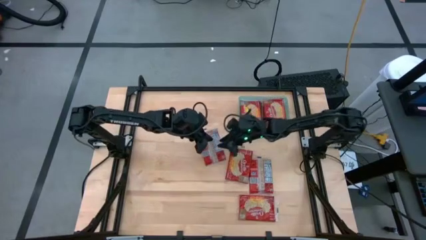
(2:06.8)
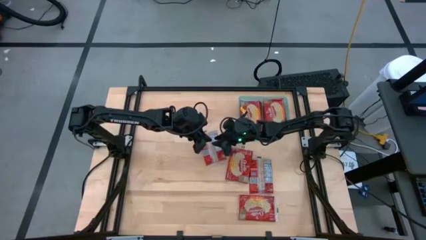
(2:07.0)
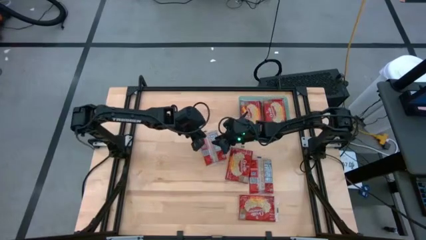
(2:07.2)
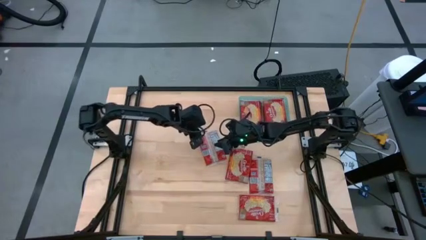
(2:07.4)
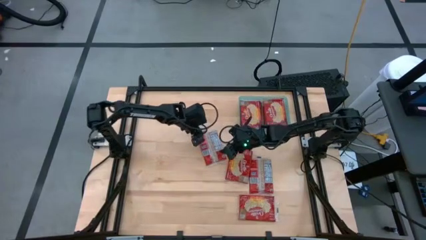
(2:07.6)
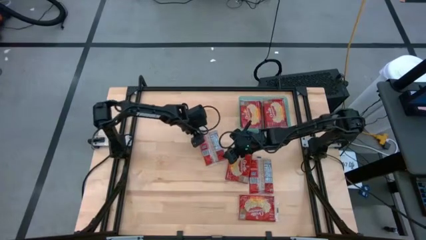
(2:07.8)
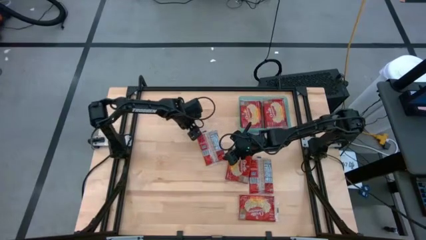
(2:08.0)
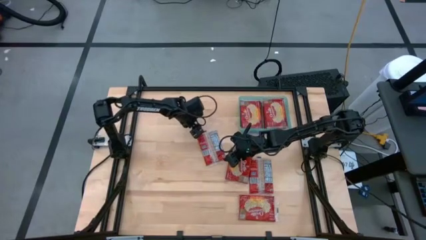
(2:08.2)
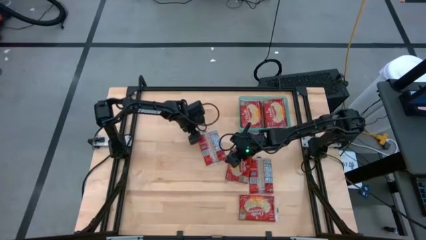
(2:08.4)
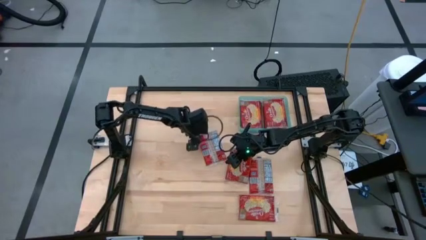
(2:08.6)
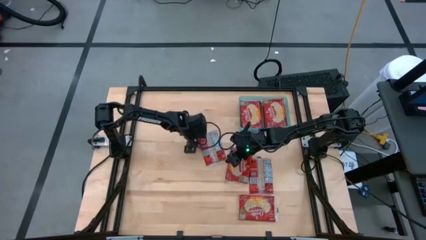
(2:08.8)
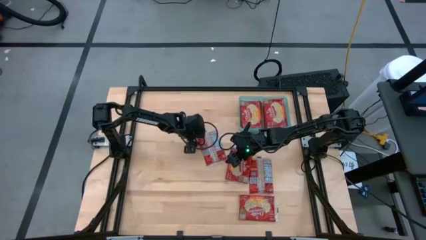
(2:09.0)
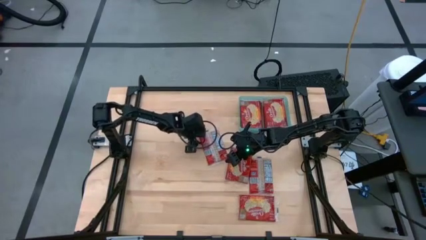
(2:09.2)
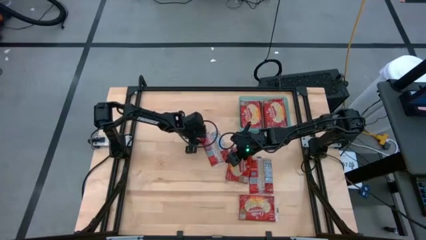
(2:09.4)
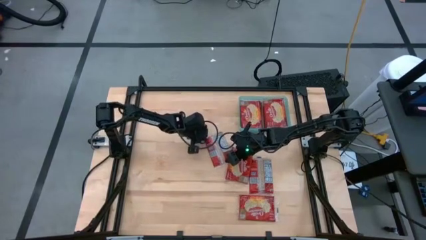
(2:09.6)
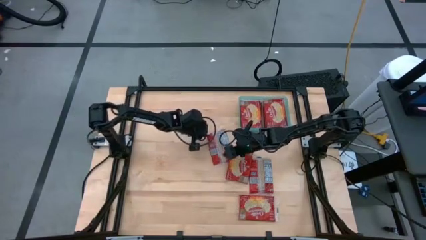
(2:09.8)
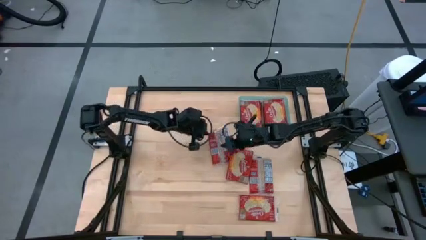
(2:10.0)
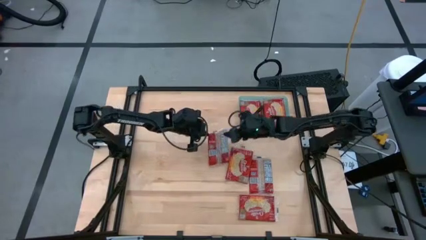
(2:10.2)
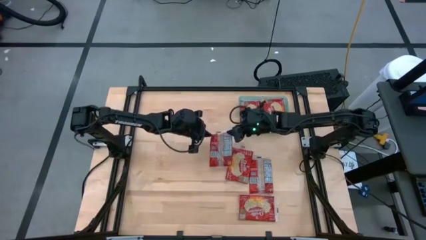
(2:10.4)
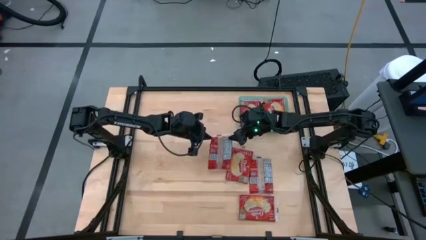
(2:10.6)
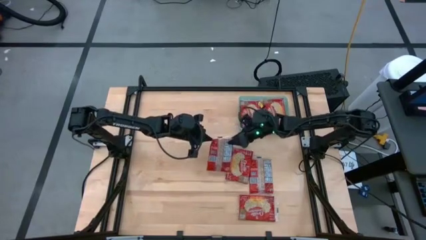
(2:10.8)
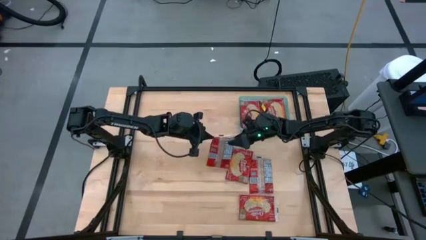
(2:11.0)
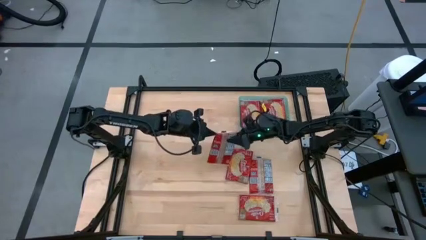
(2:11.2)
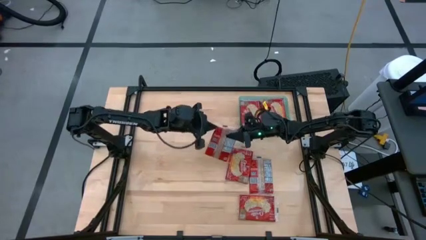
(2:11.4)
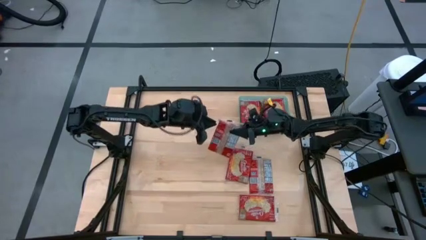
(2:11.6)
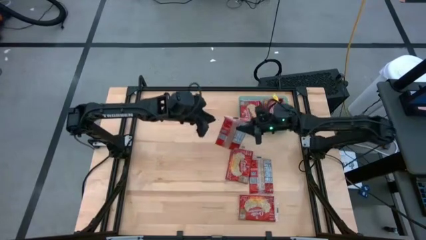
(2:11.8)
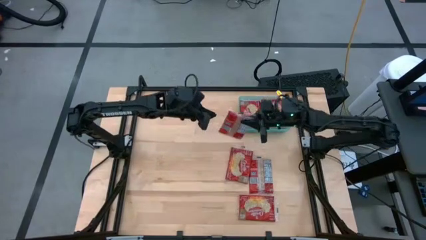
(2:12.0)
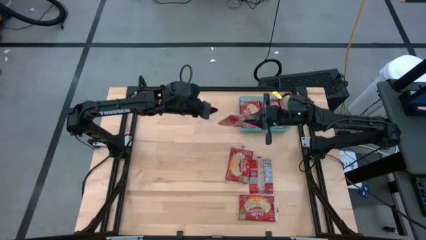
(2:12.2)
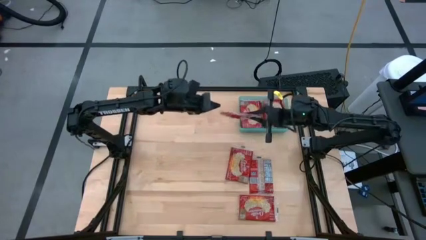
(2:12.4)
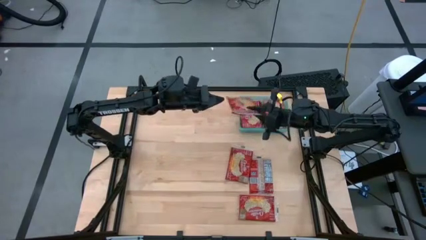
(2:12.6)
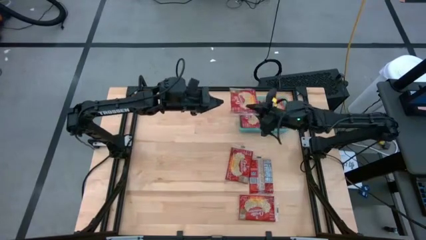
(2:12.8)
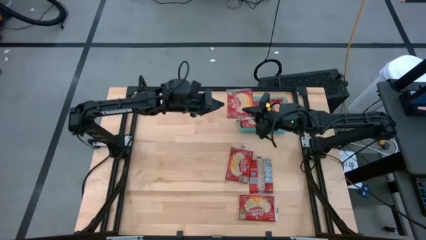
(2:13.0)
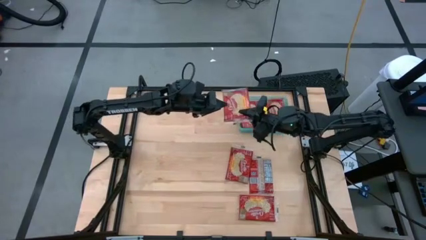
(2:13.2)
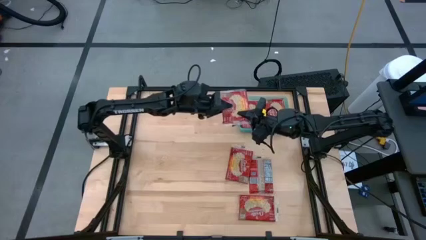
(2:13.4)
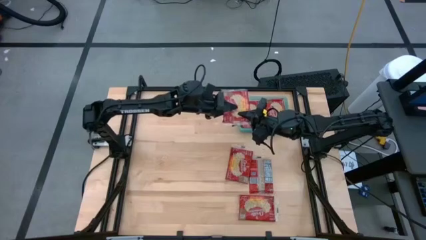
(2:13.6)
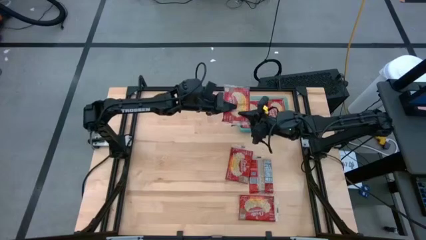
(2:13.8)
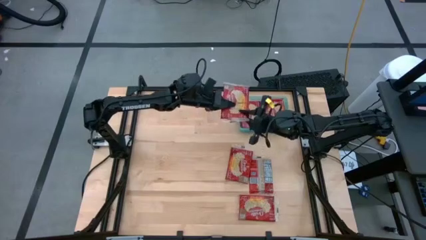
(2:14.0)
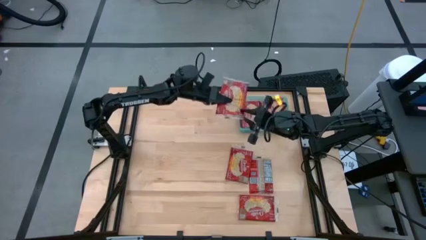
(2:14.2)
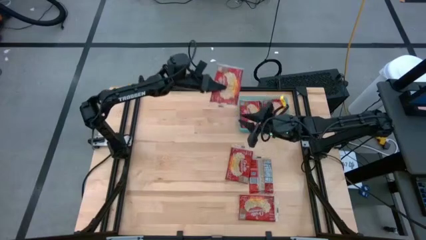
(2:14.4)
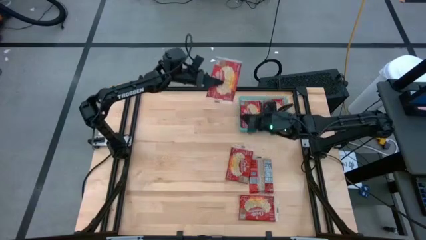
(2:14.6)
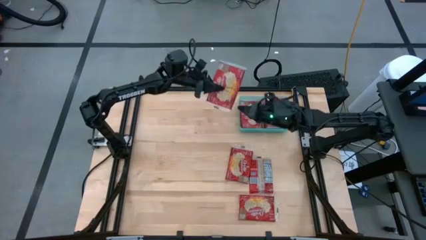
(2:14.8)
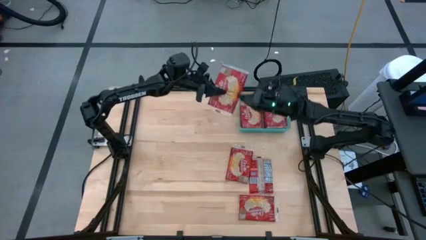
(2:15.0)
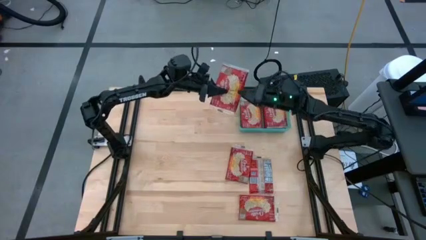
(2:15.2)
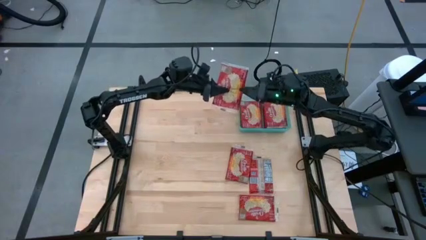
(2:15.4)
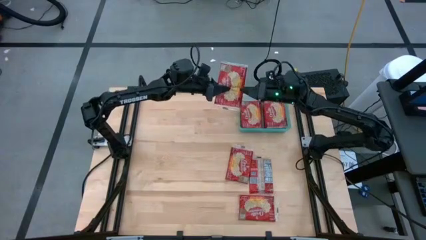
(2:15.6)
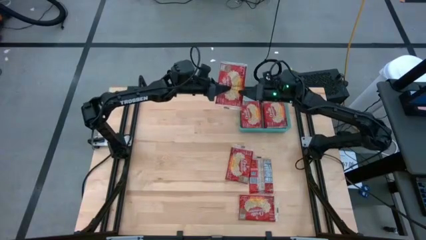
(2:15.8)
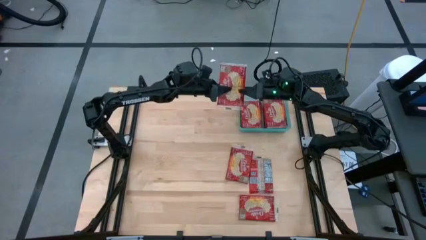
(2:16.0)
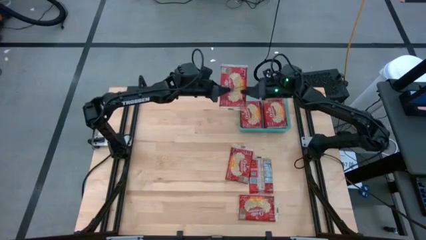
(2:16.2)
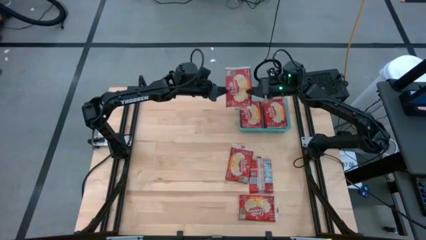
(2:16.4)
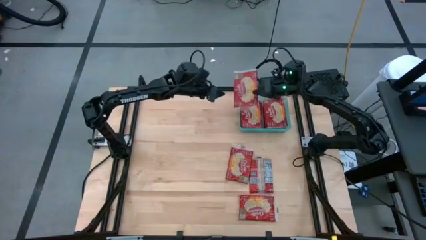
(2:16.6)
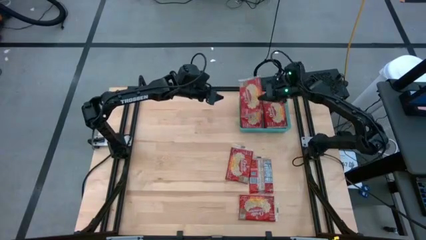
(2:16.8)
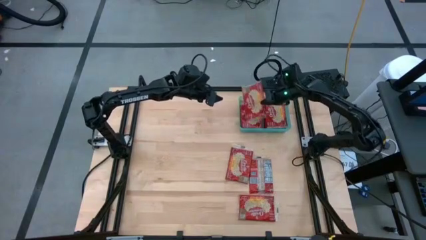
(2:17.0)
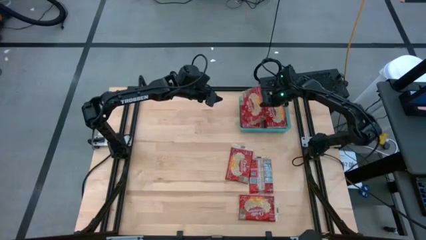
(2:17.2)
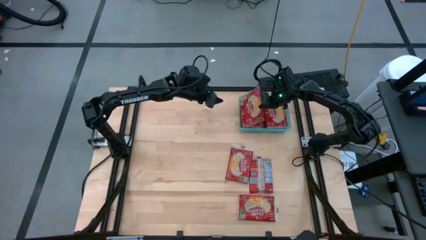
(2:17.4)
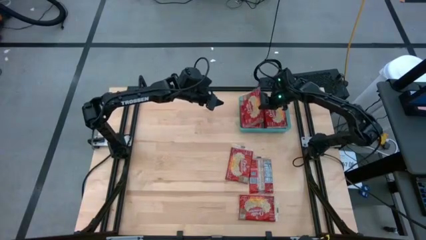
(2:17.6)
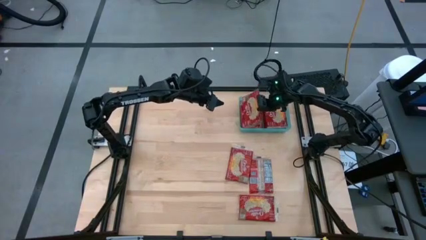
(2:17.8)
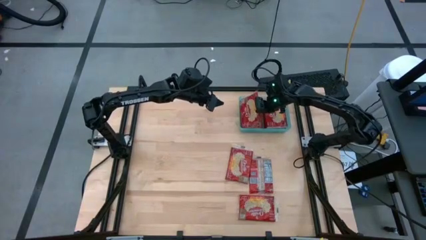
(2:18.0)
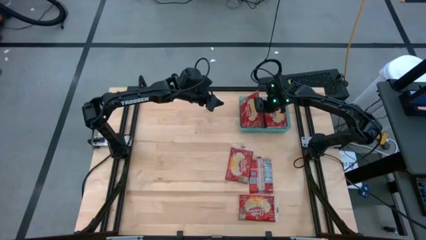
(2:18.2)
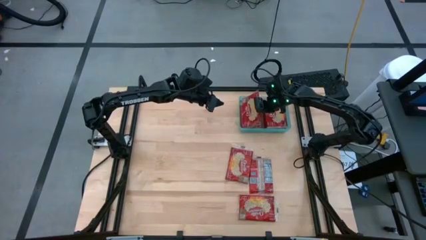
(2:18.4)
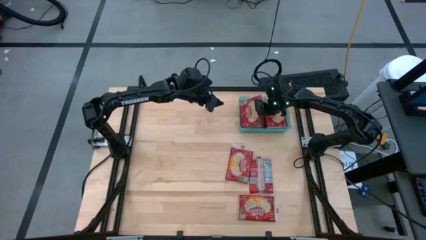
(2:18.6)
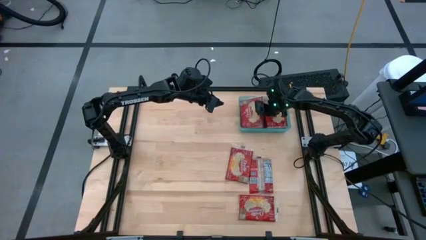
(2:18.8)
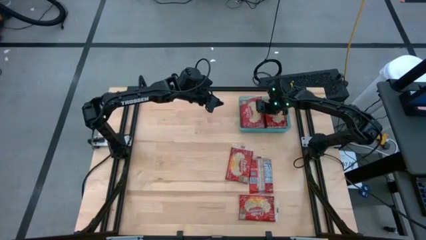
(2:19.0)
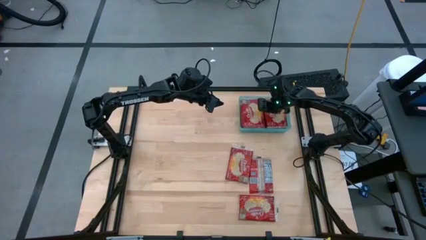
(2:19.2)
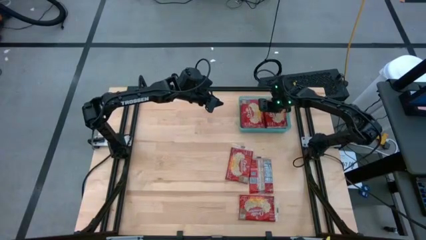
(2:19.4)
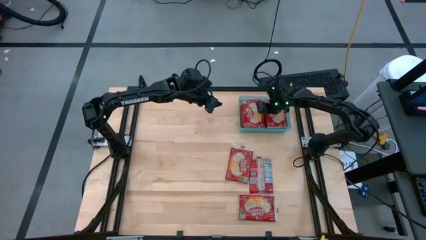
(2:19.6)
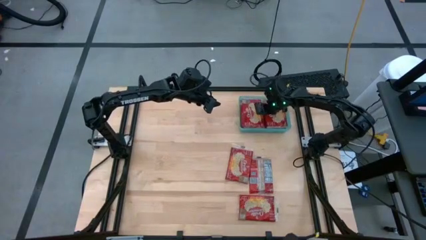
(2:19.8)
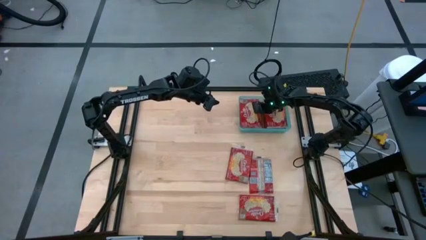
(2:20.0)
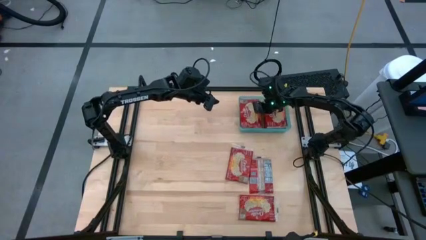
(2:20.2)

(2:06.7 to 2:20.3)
Task: Sort popcorn bags into baskets
Put the red popcorn bag into the light blue bin
